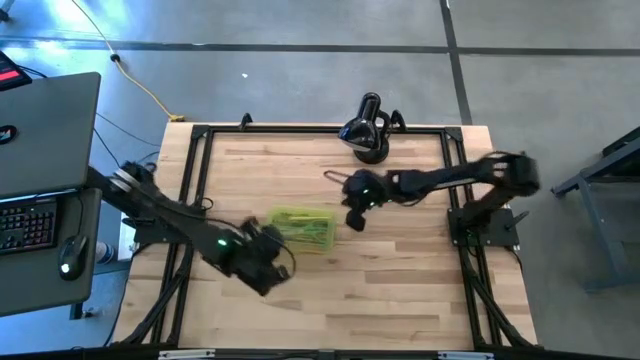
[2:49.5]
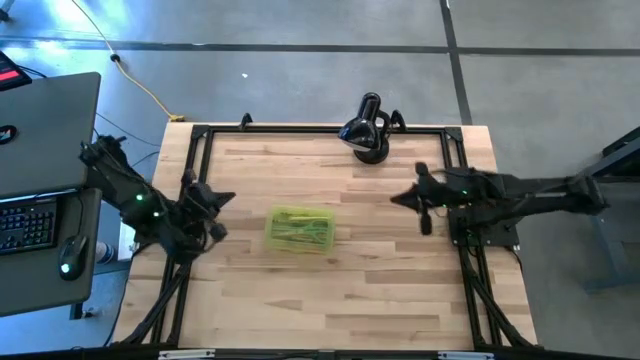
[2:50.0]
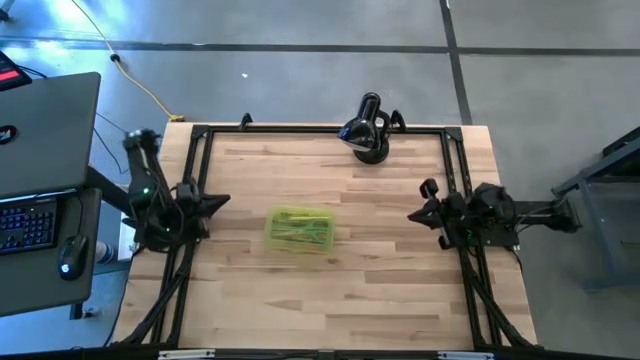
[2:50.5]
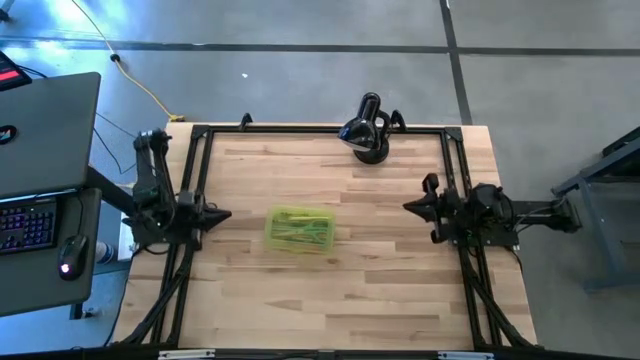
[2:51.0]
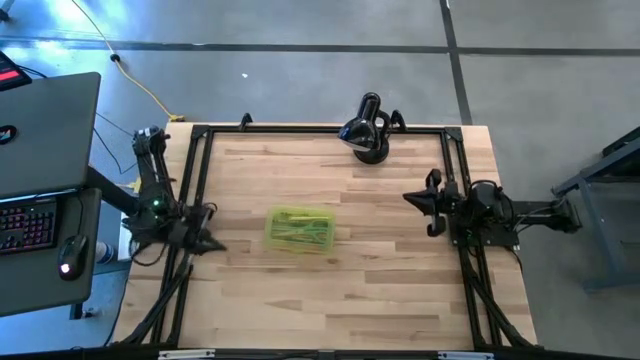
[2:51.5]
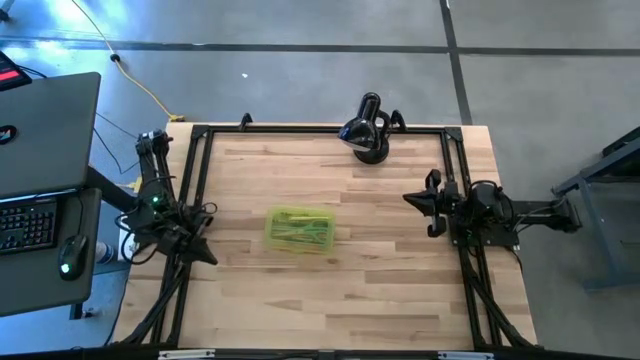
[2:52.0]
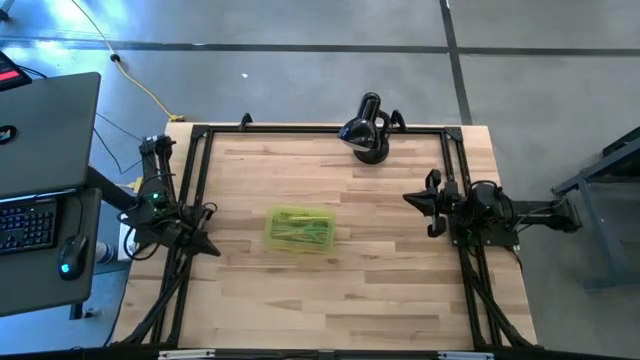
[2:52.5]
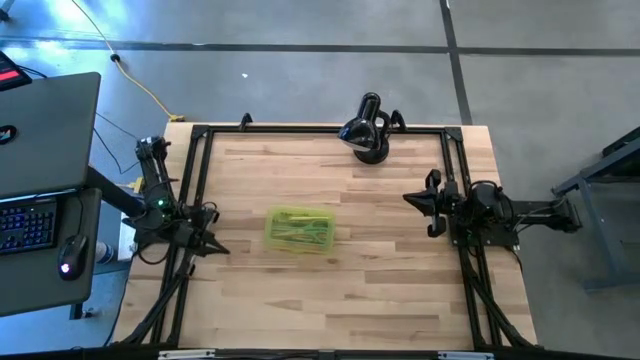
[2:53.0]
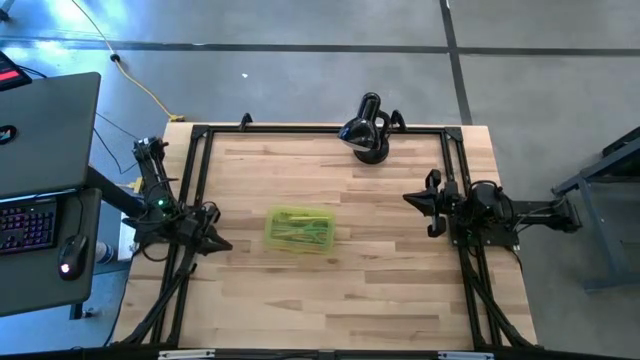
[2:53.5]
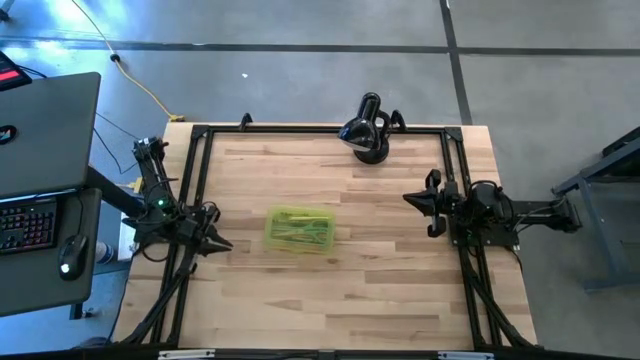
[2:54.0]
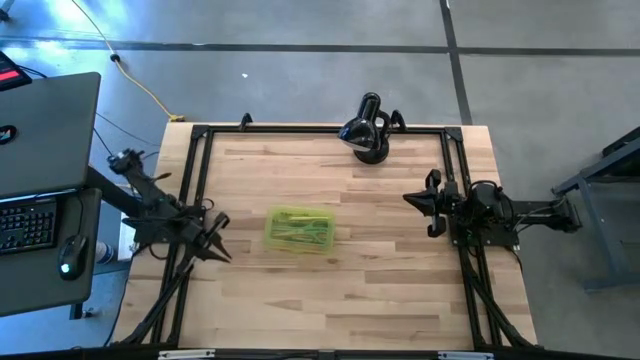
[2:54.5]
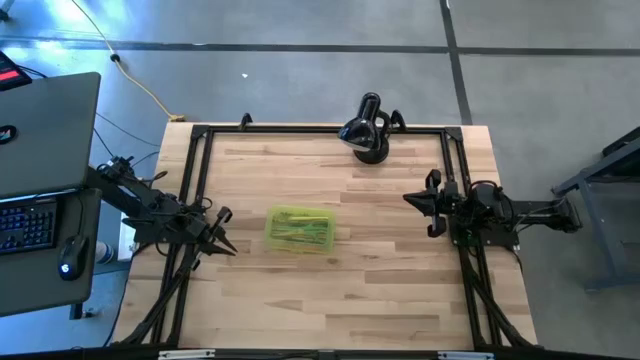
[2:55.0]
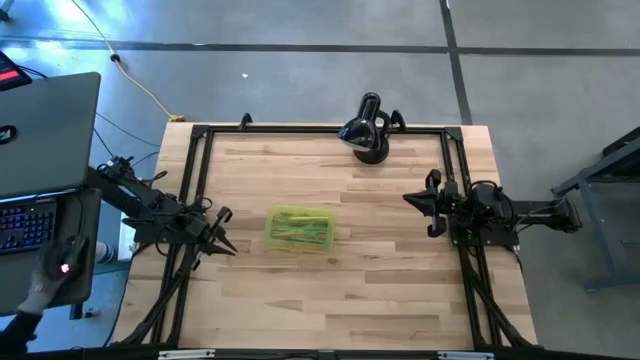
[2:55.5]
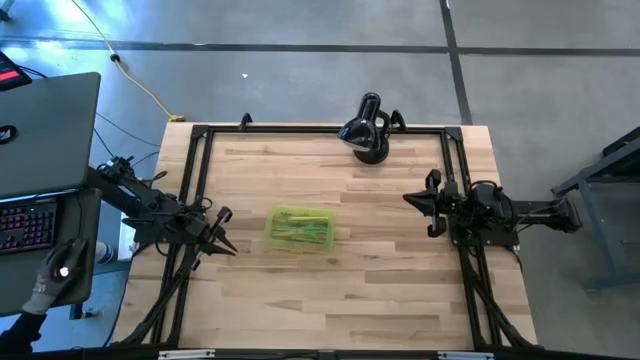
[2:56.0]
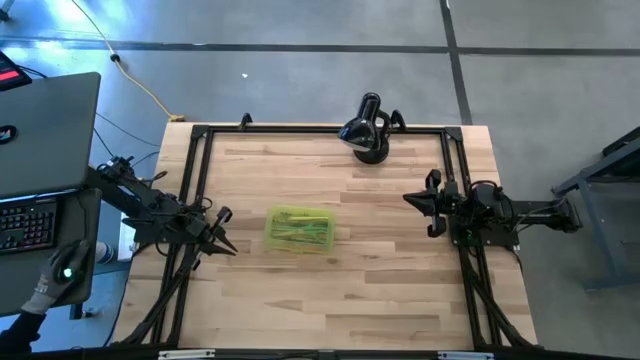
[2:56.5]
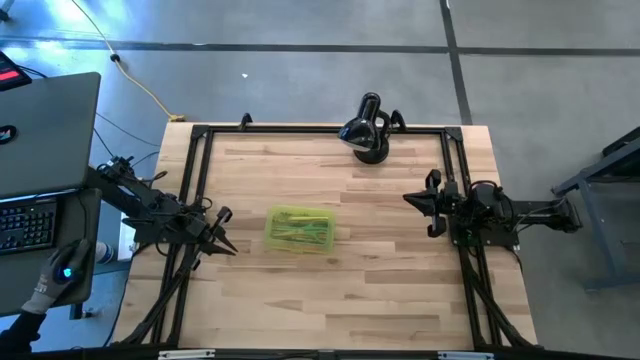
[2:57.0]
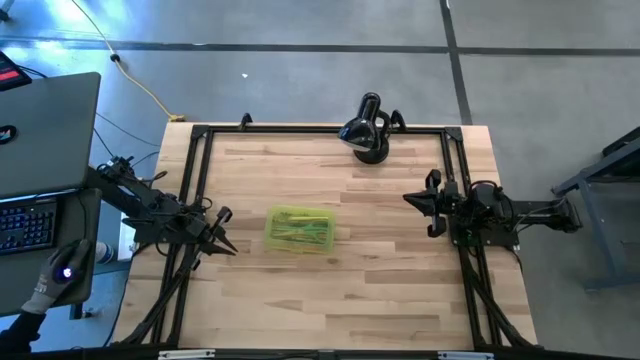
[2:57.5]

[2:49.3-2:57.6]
Task: Pick & place school supplies into a supply box
Return to Home Position

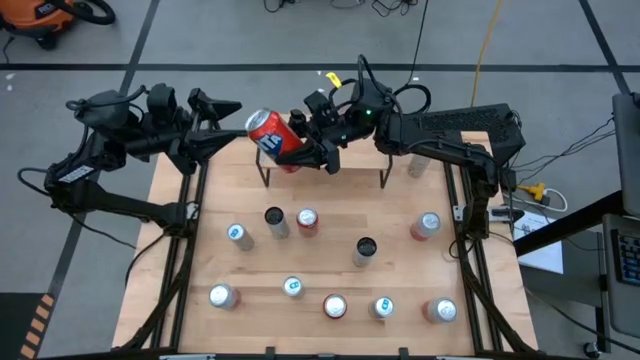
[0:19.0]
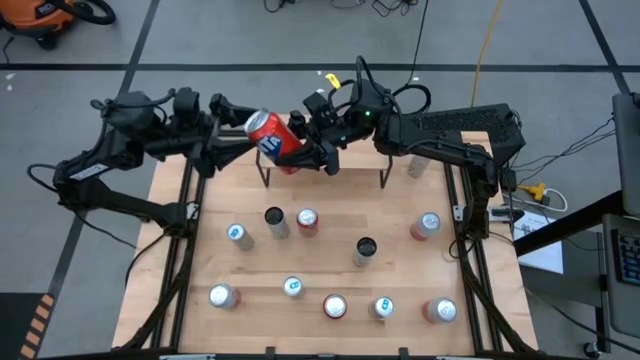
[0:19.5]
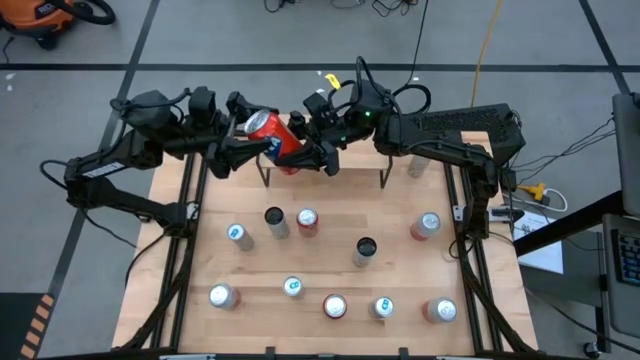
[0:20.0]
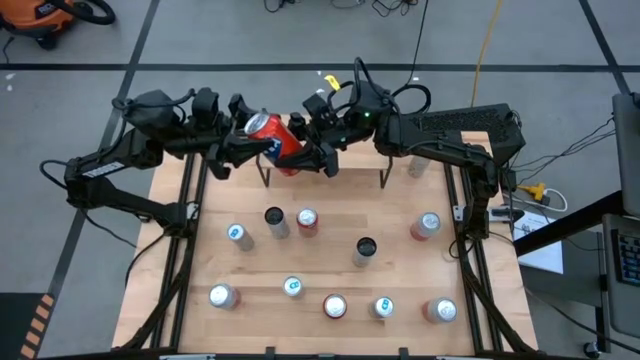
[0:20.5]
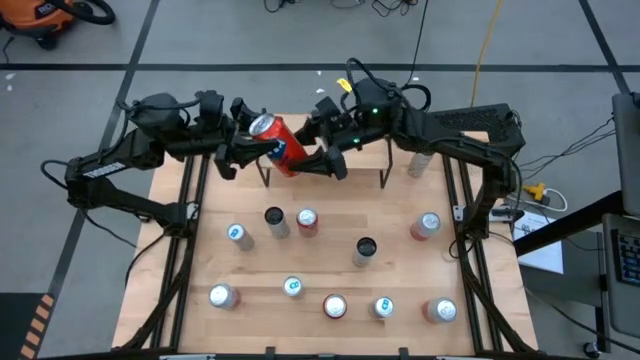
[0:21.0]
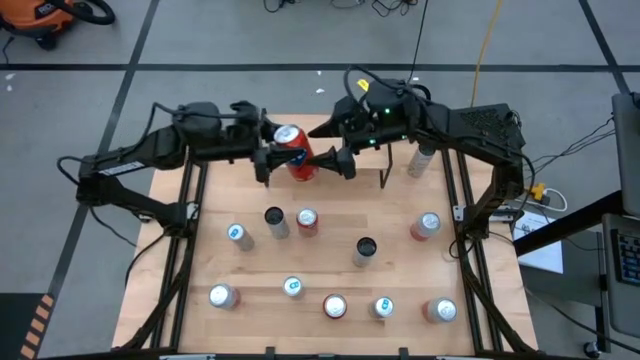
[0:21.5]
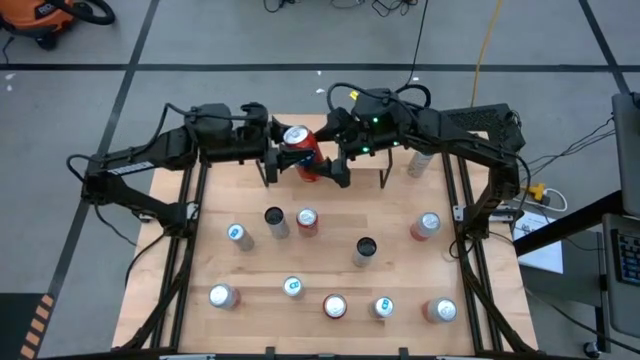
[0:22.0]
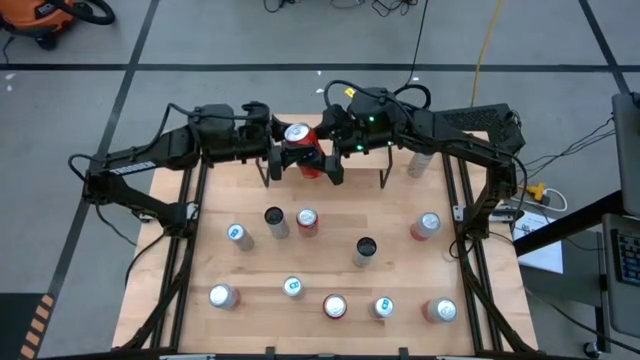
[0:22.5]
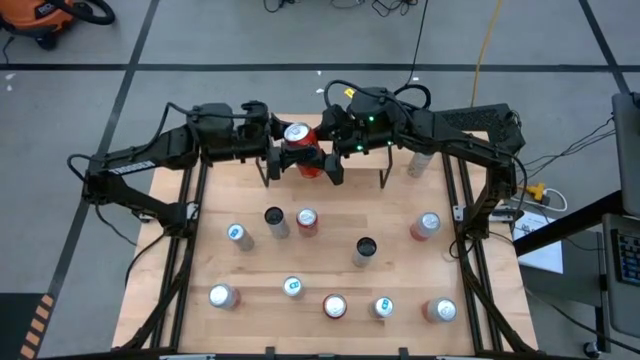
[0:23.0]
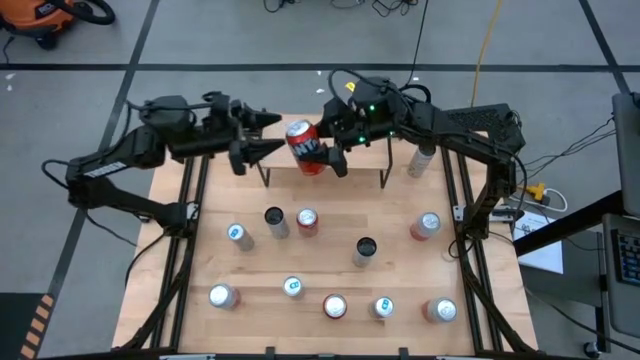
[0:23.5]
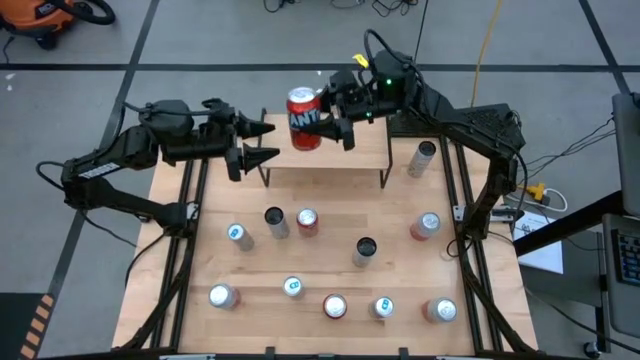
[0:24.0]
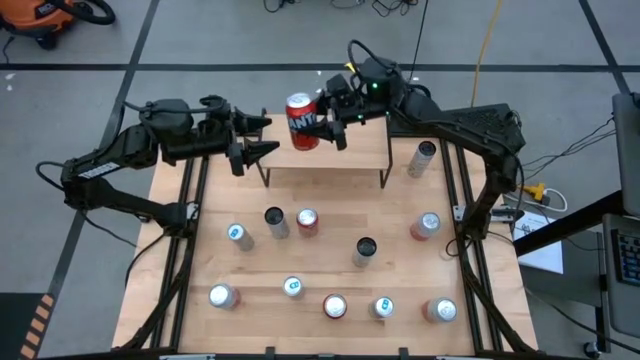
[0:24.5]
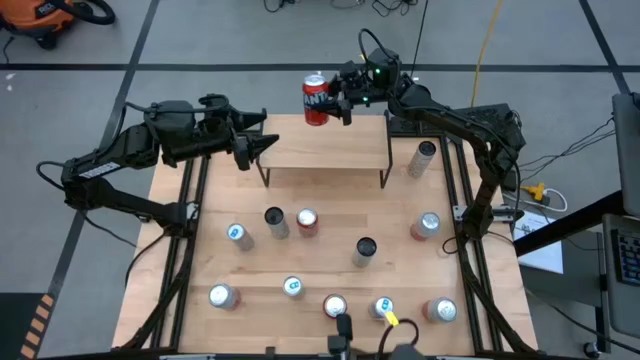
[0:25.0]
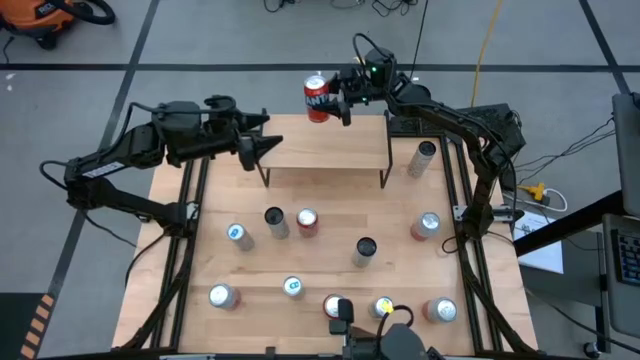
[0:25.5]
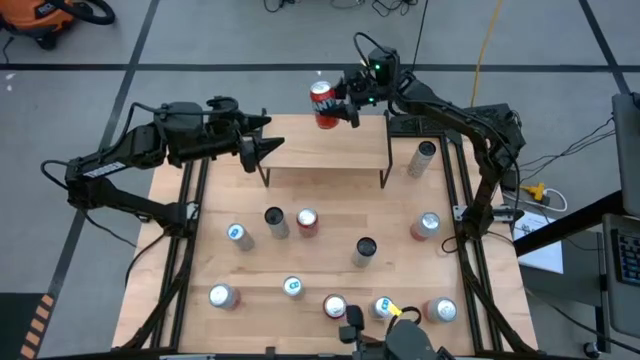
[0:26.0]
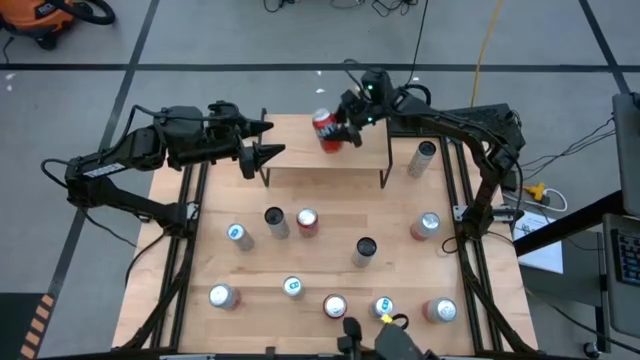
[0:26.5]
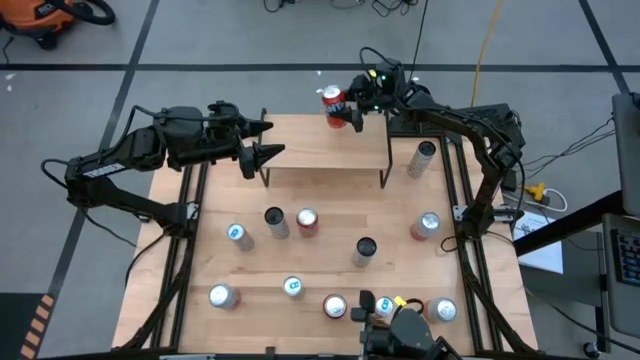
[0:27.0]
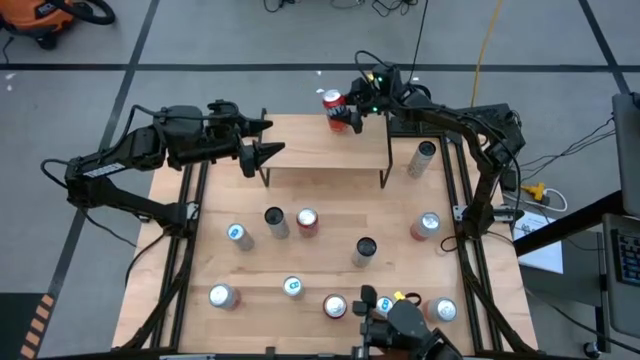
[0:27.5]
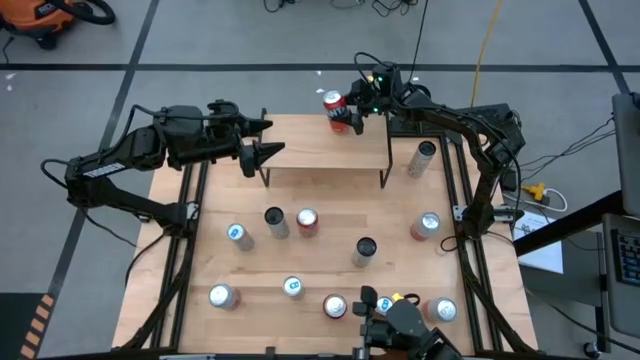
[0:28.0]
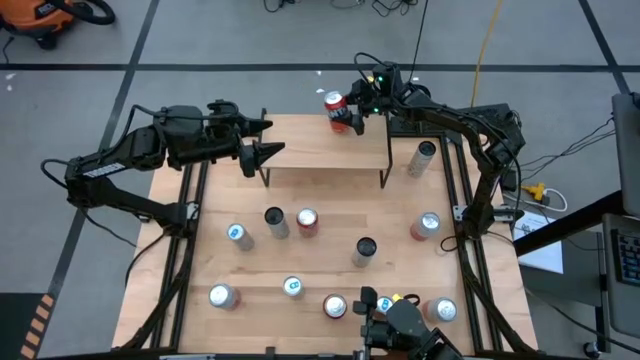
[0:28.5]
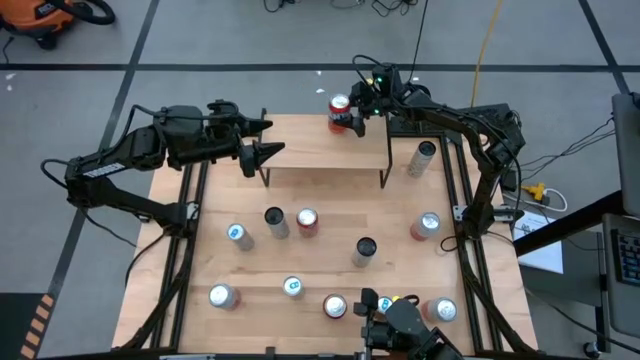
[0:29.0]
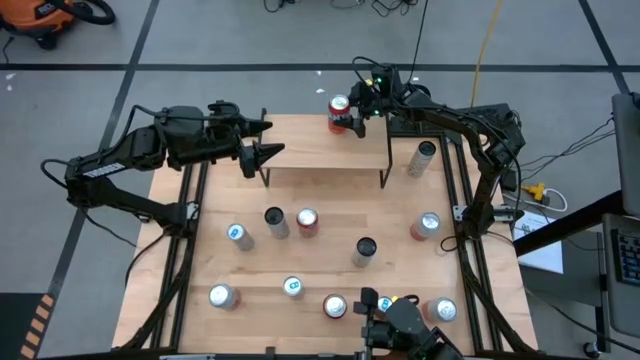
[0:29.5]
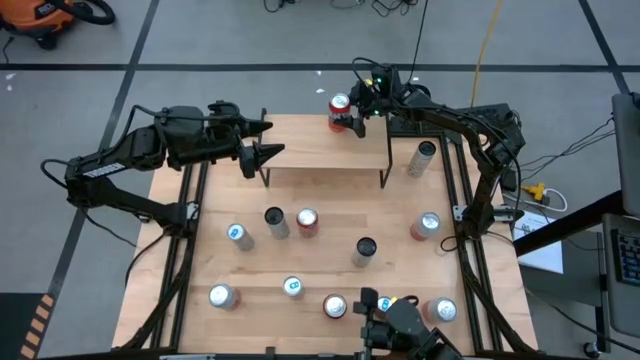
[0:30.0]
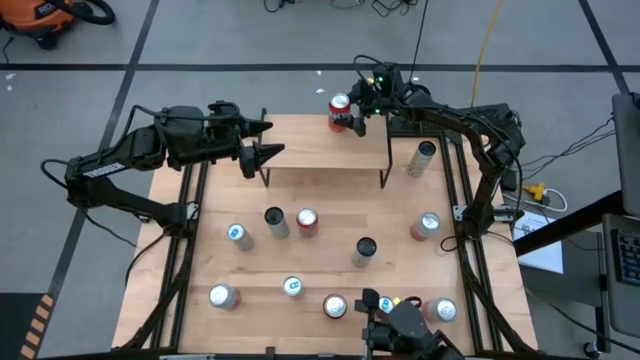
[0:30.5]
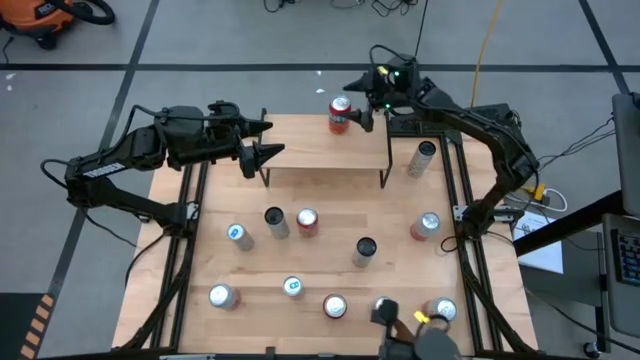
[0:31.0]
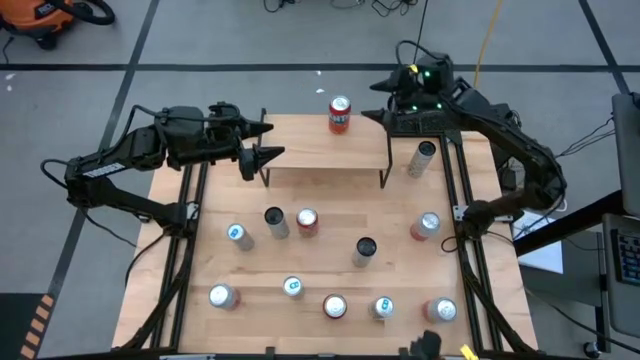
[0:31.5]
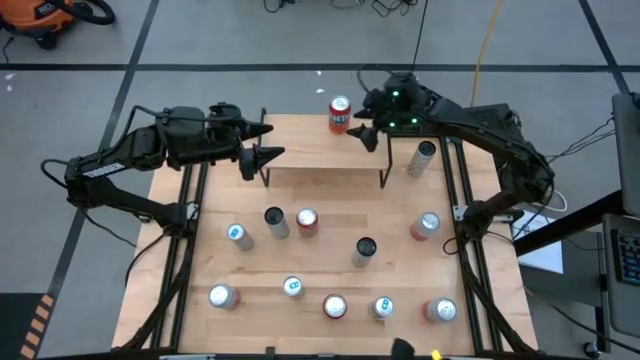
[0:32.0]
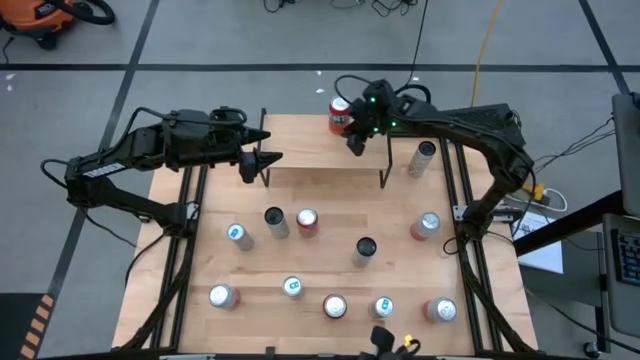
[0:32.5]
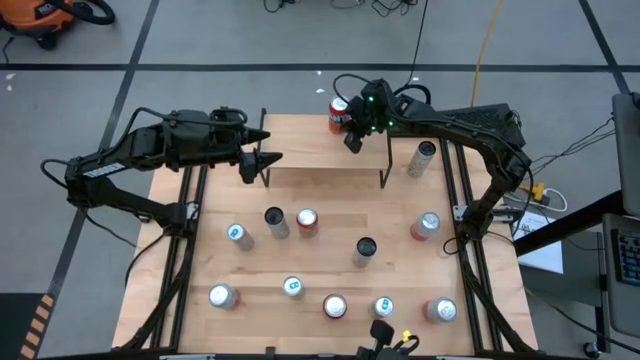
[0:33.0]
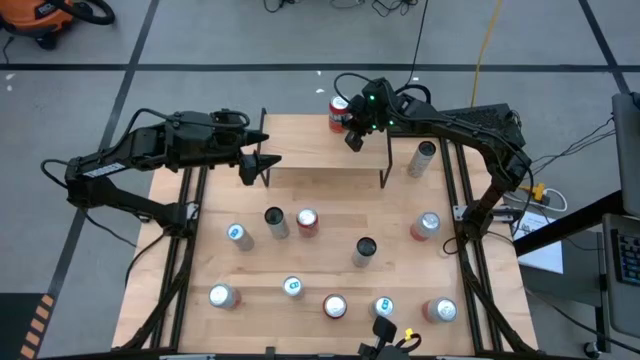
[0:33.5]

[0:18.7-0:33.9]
Task: Place canned beverage on shelf
Put the top left orange soda can on the shelf
